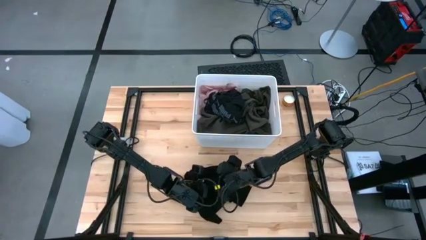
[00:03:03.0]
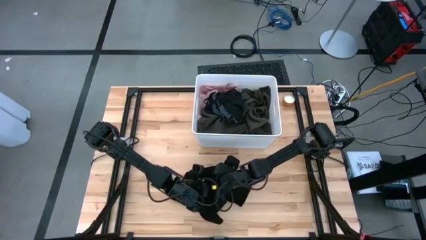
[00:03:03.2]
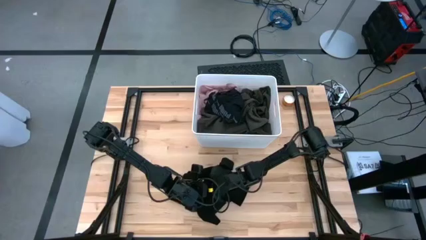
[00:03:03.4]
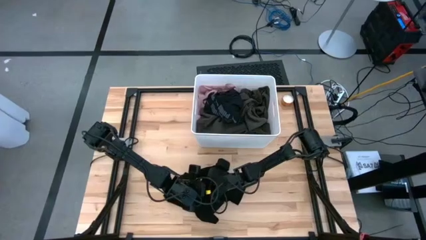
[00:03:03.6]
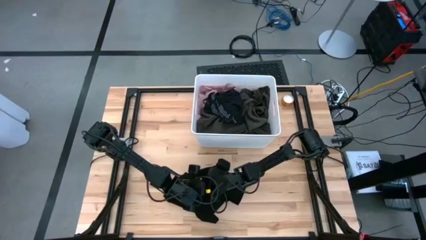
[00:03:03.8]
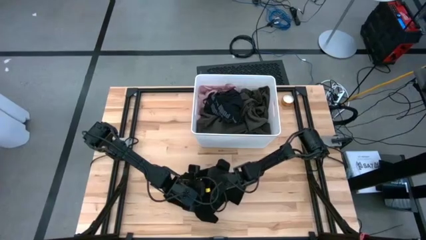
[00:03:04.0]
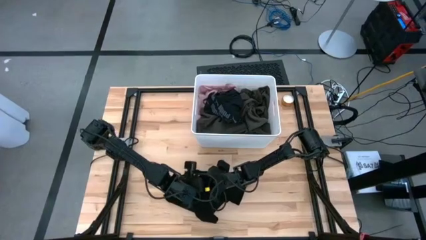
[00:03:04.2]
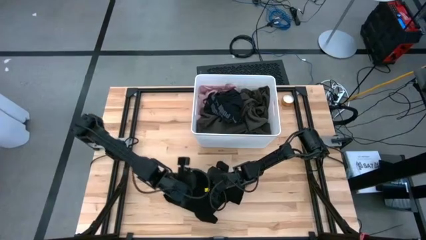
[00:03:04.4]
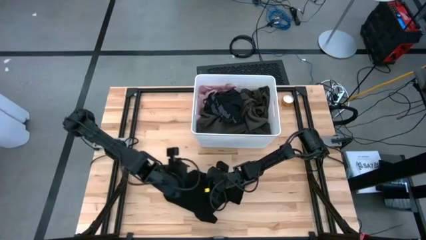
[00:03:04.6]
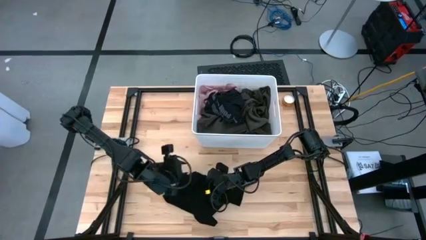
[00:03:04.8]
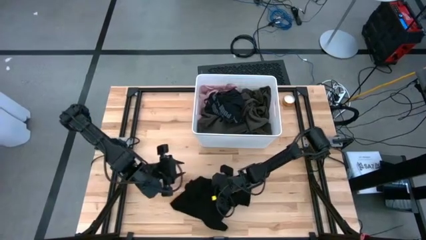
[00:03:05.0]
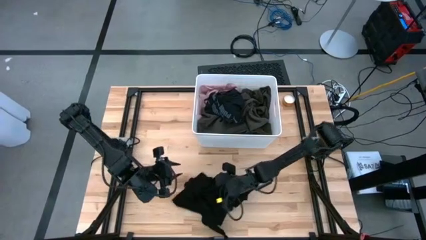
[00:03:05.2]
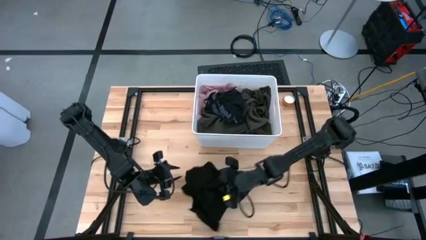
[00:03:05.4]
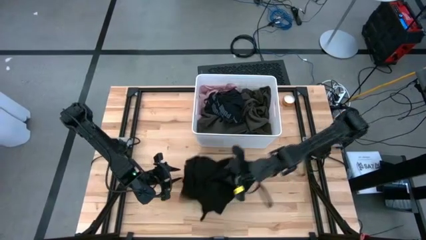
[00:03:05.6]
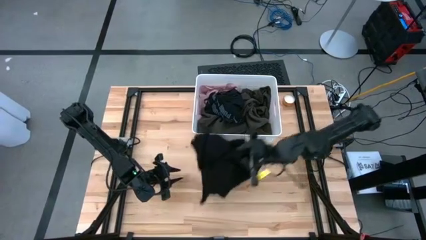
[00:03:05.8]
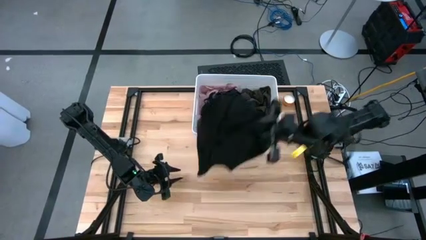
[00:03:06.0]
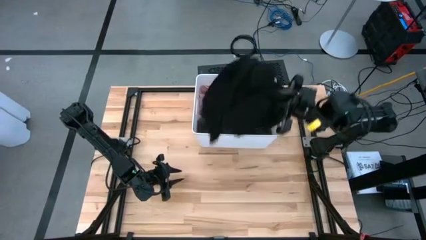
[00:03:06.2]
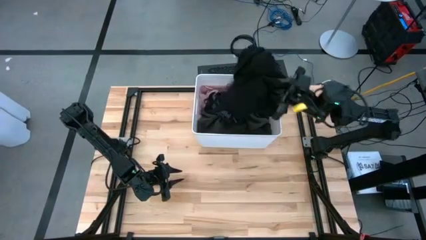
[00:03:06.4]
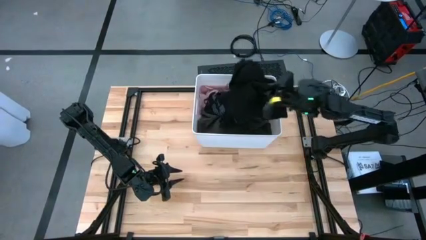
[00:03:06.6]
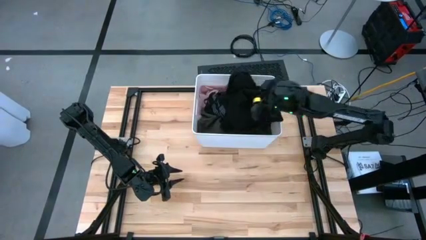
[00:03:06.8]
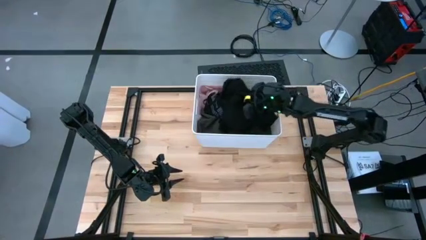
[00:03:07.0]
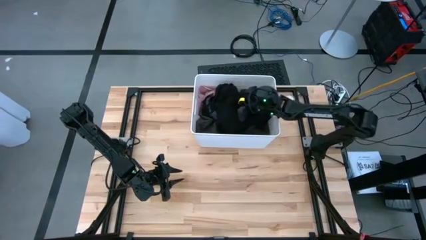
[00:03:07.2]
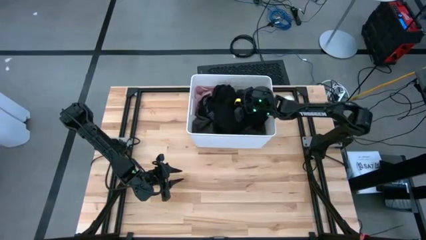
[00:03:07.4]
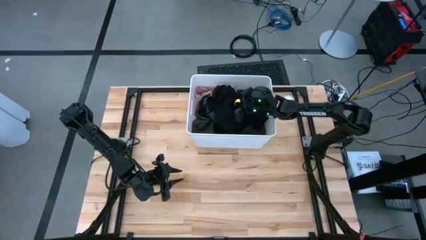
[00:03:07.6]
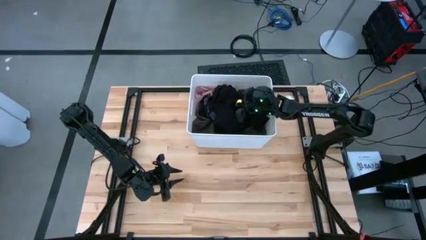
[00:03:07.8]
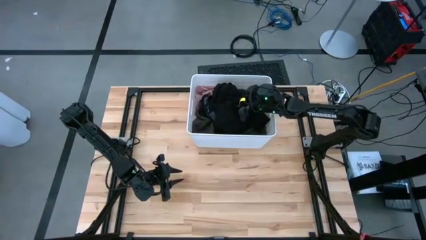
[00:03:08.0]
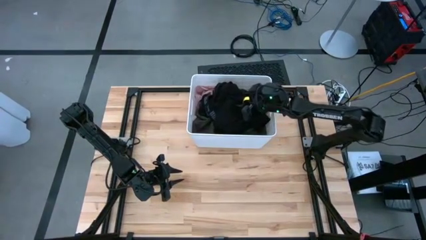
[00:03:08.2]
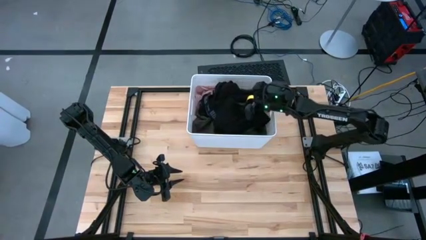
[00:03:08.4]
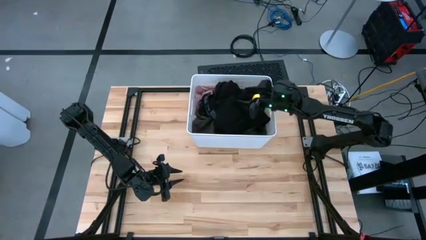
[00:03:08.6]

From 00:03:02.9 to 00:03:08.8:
Task: Sort clothes
Put the black jacket into the laundry organizer bin

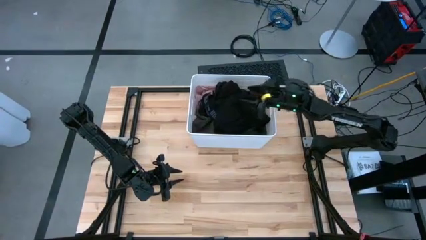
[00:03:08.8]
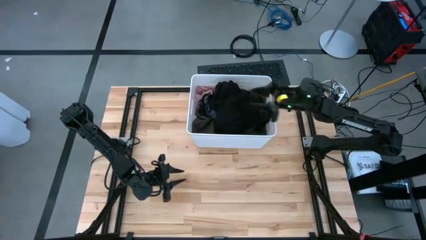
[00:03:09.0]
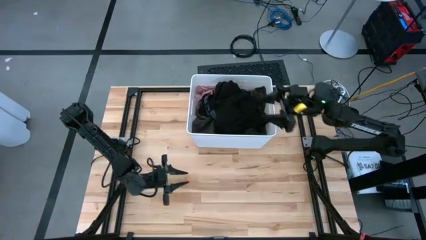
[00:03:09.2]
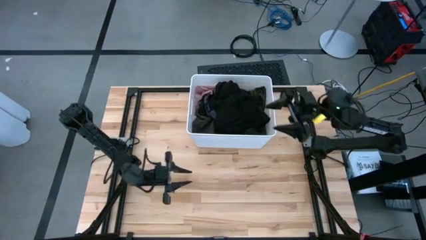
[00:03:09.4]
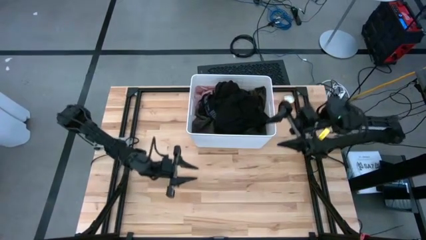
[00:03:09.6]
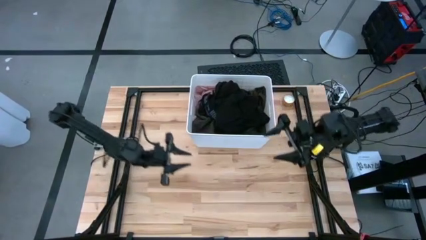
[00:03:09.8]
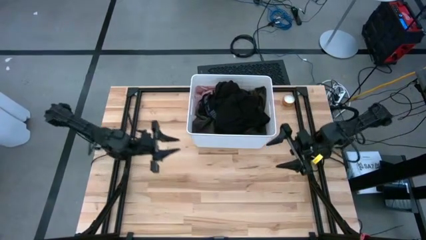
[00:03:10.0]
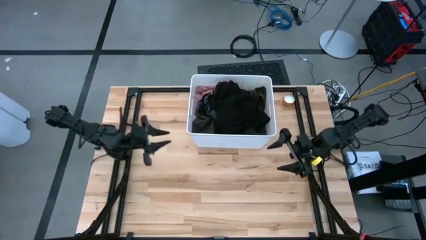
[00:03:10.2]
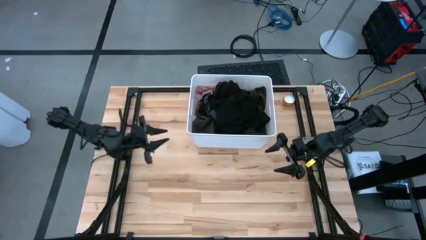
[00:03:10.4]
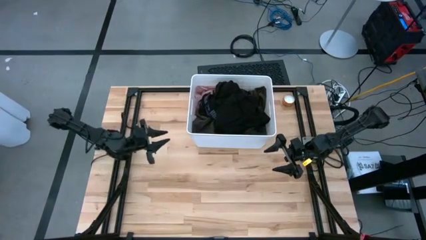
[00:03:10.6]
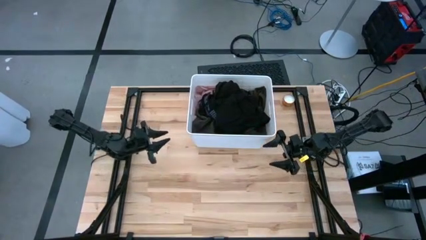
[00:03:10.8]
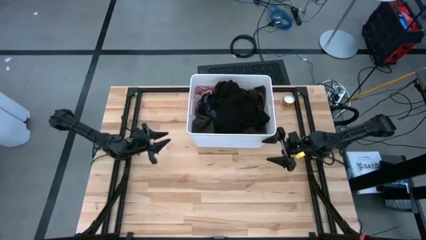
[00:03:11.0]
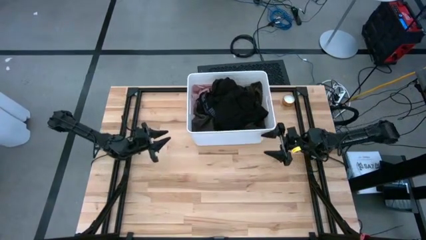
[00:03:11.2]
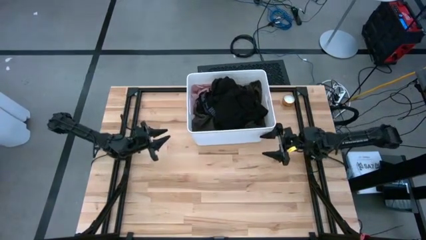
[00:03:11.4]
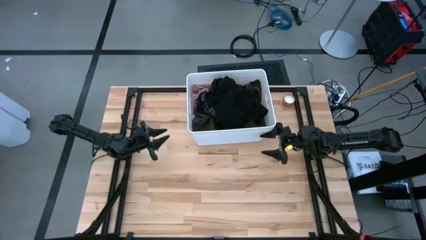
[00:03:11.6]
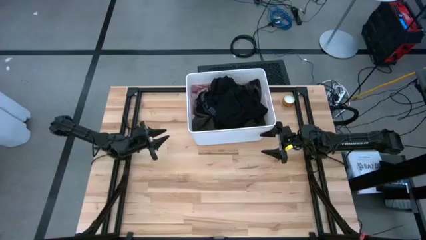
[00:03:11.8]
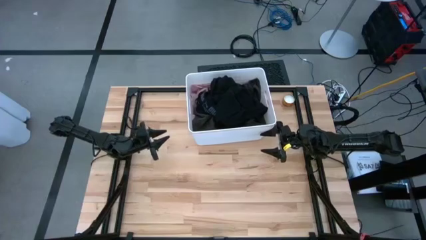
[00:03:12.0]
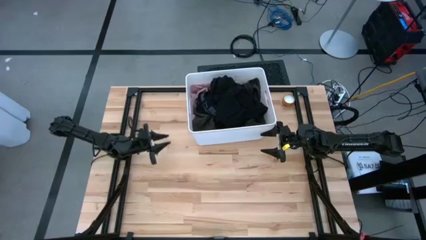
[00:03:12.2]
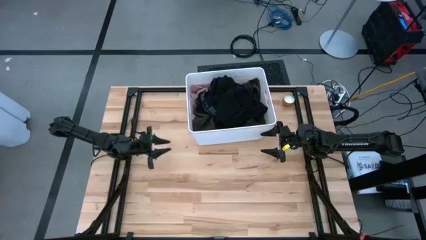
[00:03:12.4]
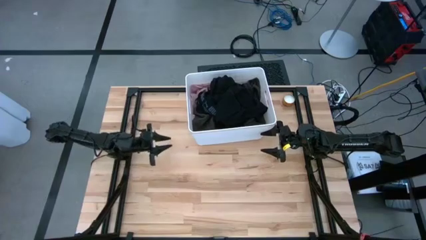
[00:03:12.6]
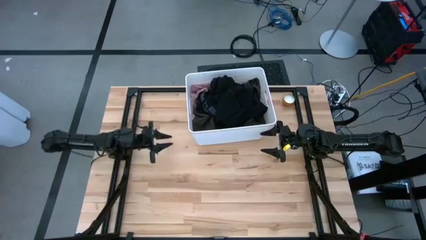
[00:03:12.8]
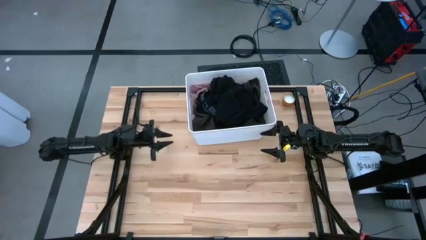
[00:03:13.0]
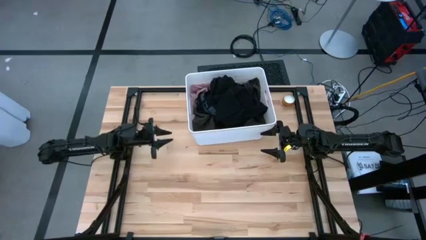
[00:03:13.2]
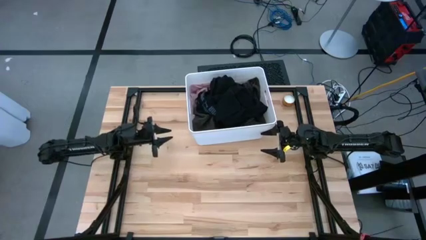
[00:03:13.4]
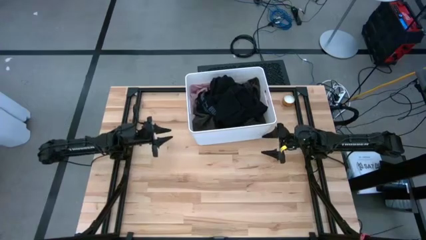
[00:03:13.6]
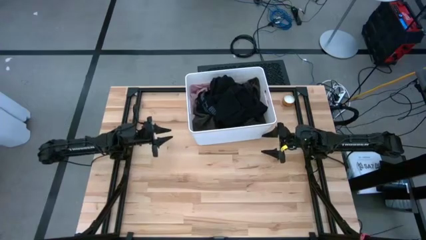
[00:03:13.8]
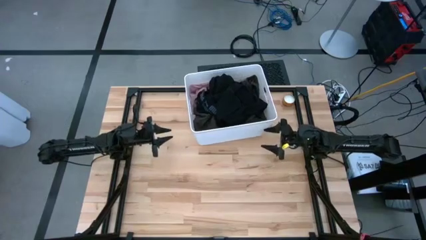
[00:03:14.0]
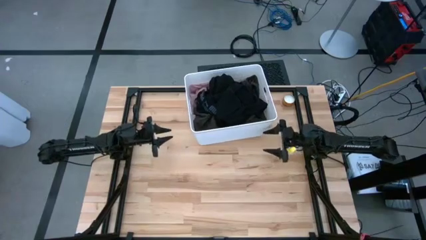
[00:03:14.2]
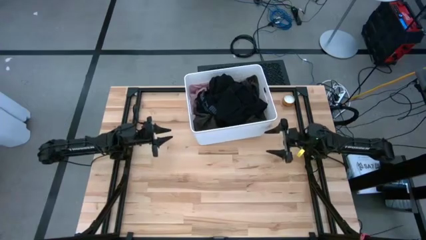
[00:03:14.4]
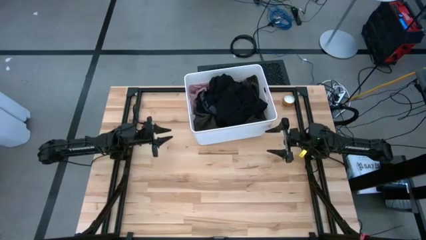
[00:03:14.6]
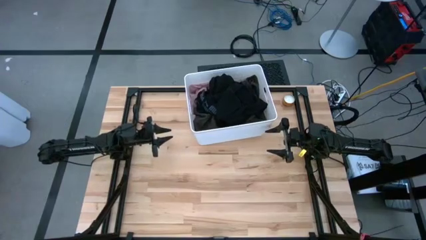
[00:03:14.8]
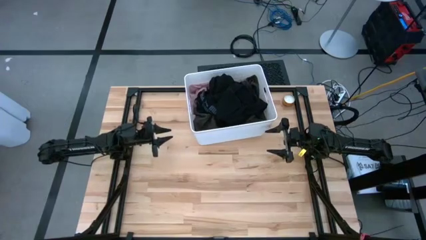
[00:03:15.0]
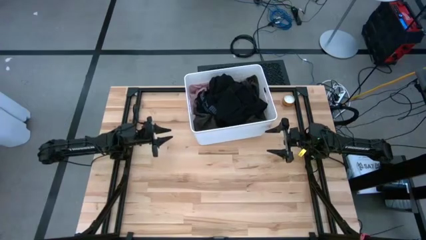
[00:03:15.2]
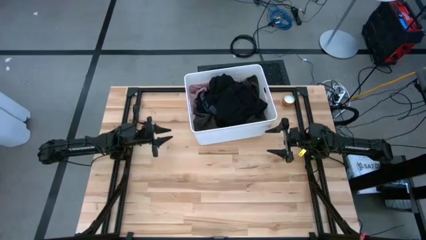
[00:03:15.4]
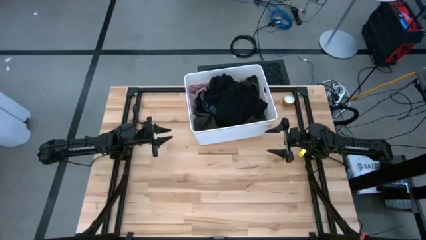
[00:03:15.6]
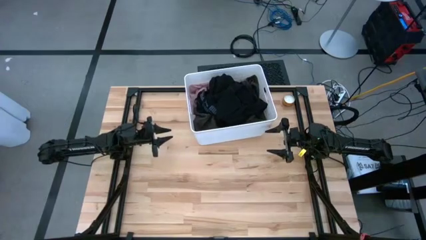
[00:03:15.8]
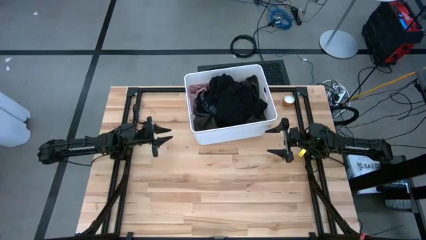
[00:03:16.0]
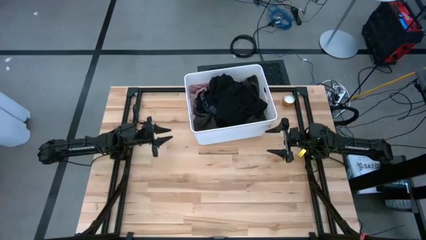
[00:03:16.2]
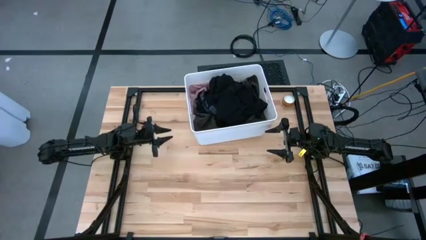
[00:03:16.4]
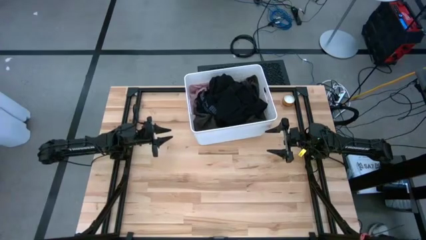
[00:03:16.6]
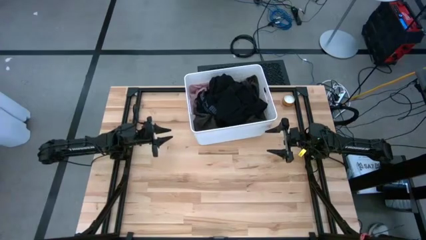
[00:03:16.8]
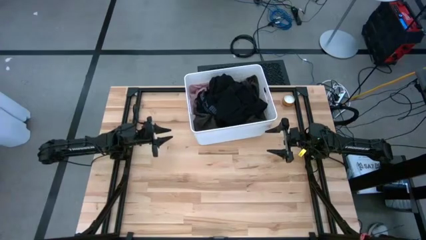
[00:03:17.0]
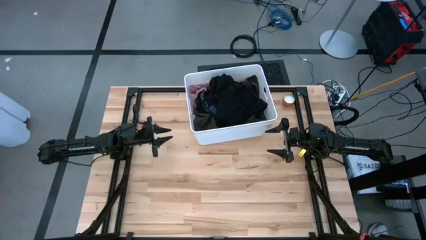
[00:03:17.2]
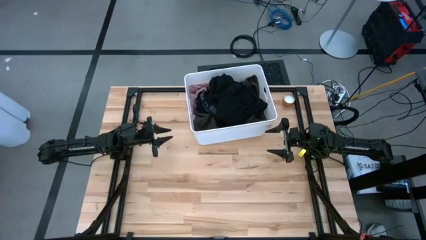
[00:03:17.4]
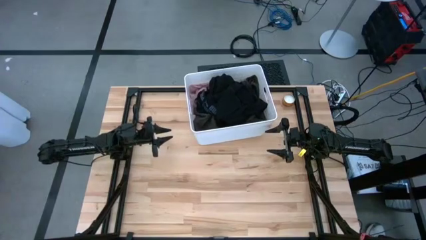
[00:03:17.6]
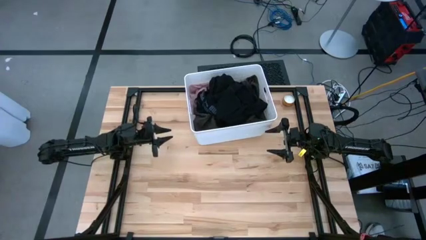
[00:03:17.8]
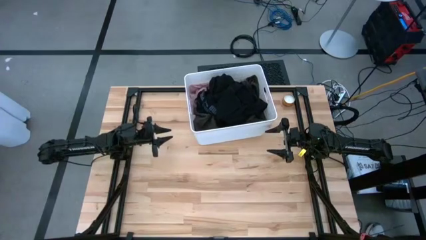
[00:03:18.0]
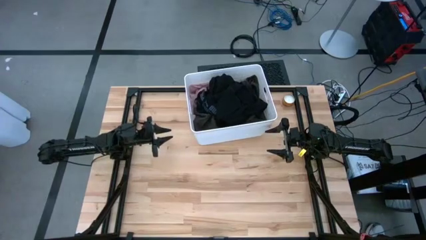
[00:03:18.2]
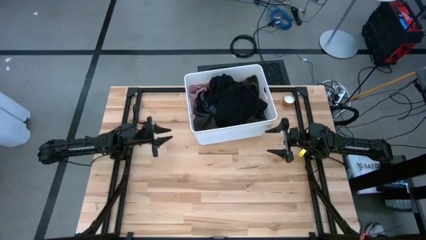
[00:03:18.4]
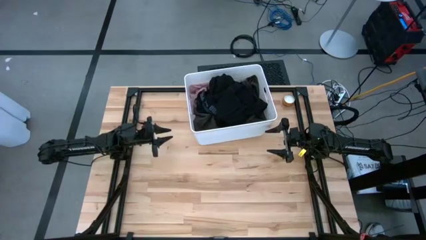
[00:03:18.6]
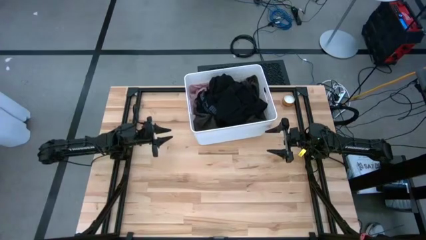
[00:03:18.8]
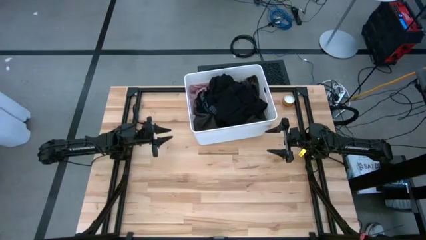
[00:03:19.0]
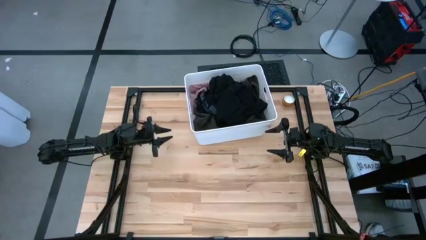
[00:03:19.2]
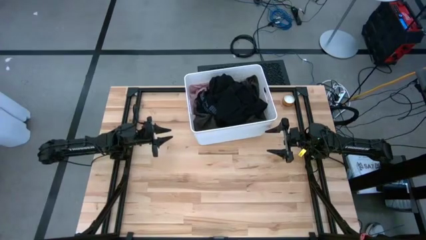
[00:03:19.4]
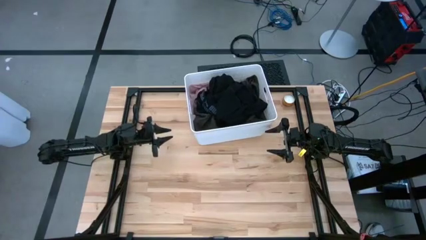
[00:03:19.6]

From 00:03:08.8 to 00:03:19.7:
Return to Home Position
